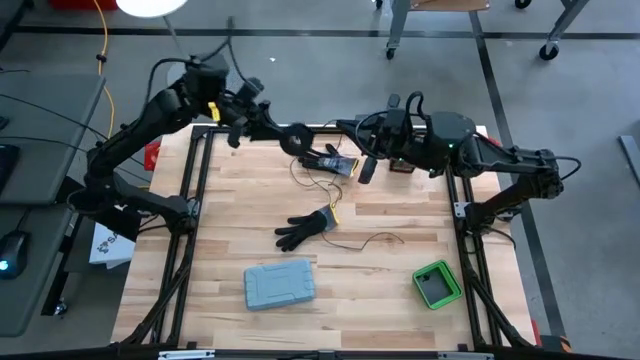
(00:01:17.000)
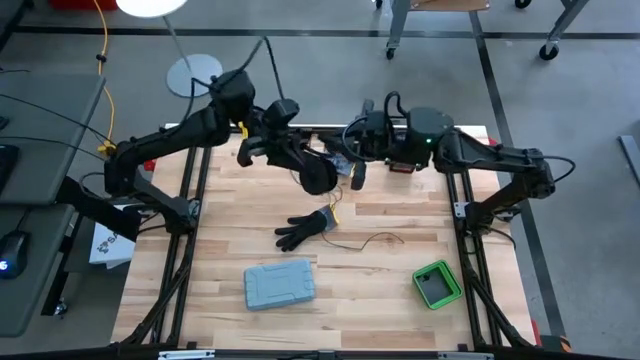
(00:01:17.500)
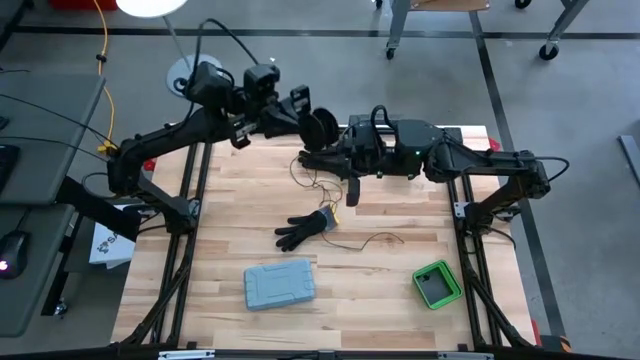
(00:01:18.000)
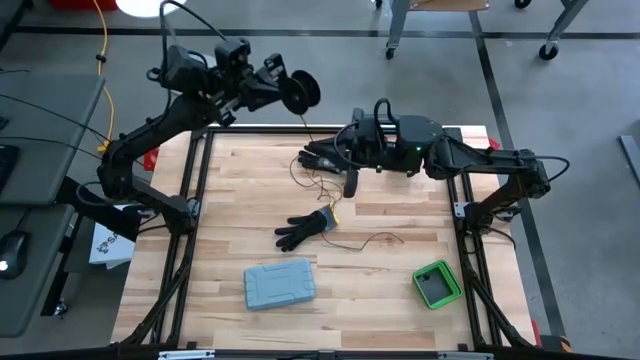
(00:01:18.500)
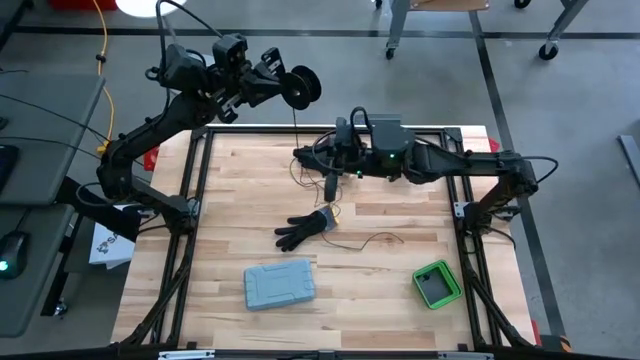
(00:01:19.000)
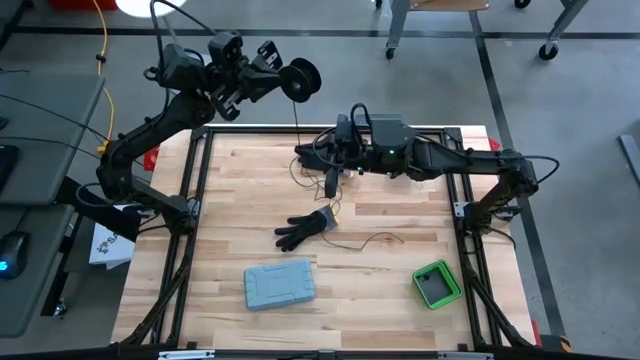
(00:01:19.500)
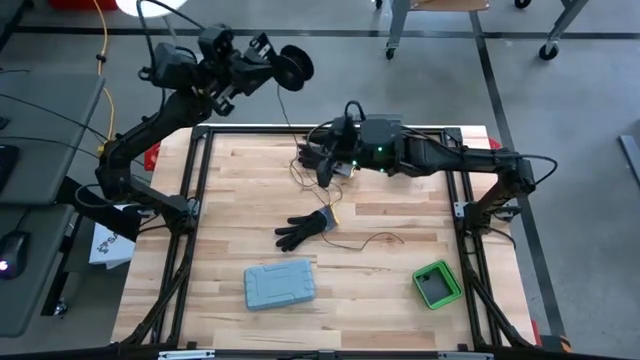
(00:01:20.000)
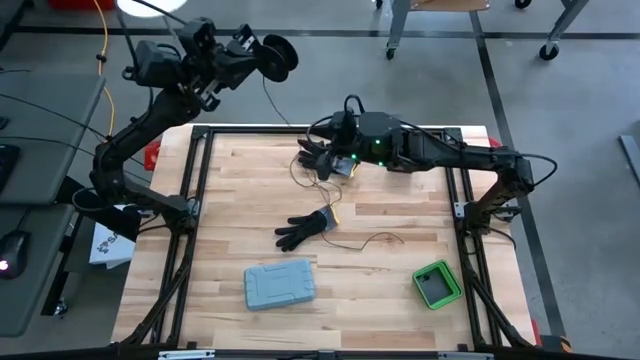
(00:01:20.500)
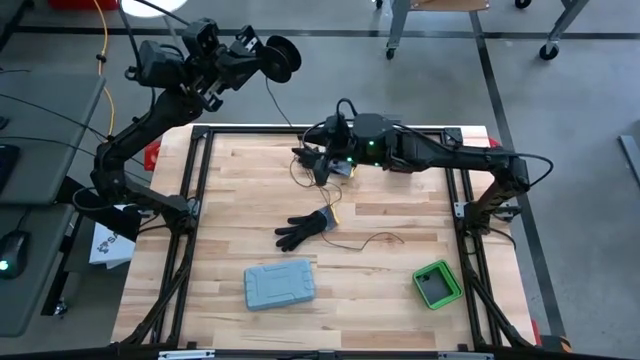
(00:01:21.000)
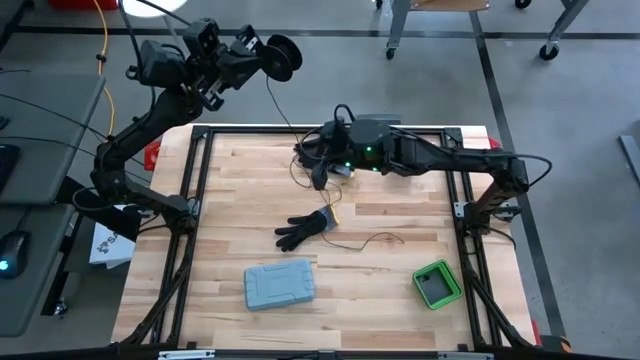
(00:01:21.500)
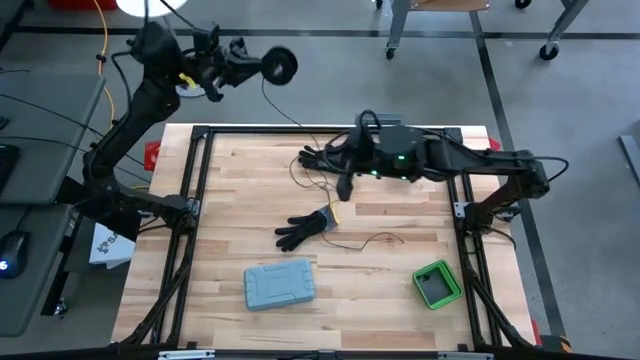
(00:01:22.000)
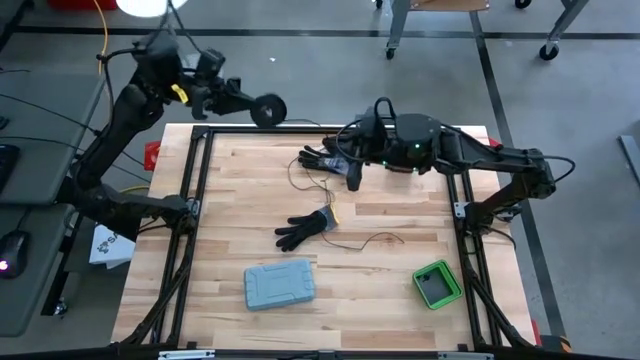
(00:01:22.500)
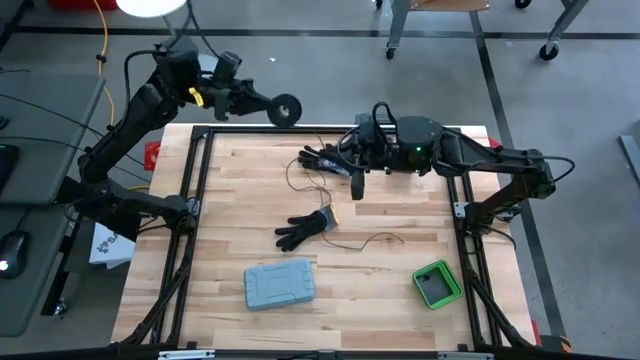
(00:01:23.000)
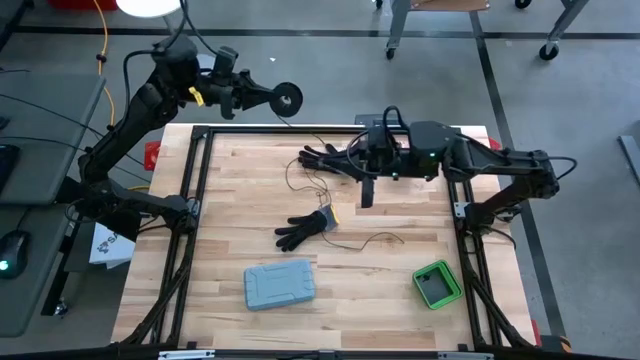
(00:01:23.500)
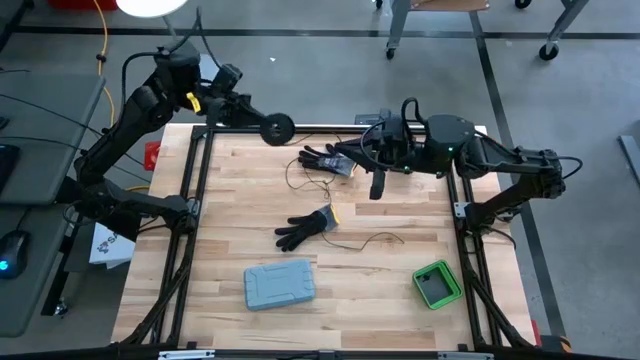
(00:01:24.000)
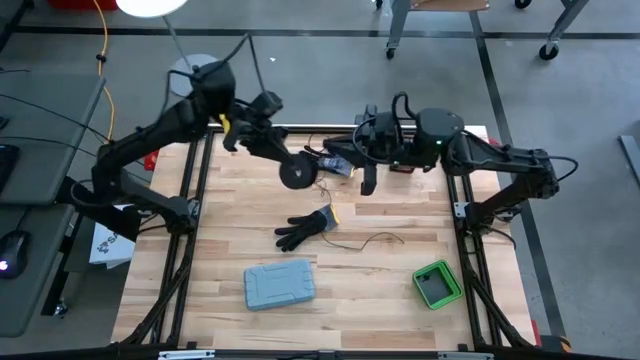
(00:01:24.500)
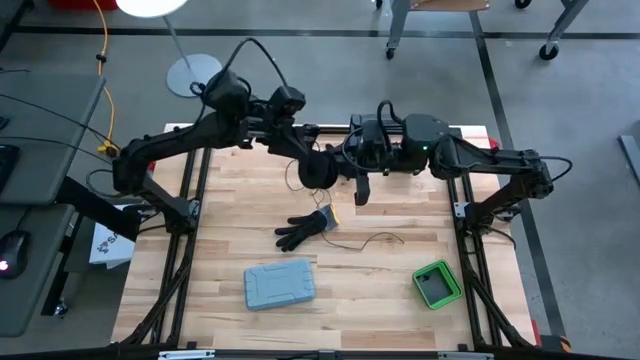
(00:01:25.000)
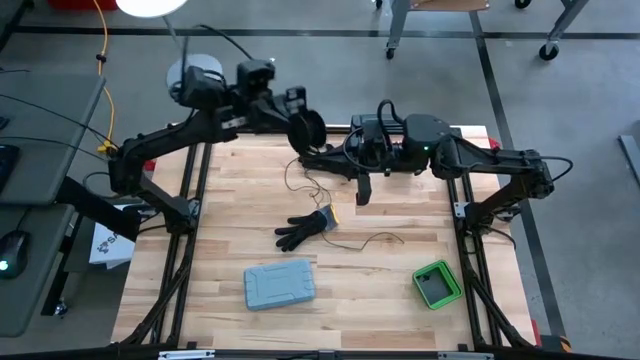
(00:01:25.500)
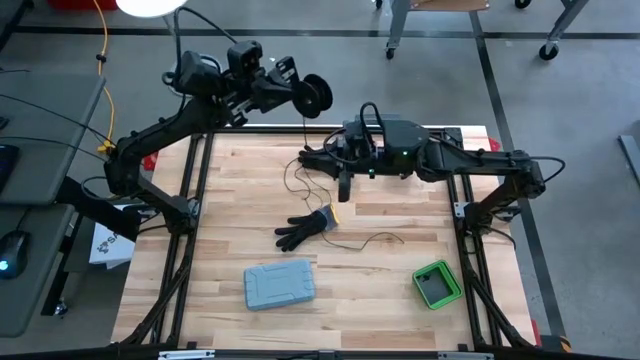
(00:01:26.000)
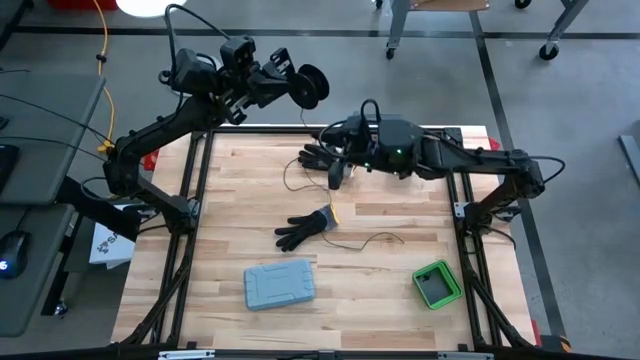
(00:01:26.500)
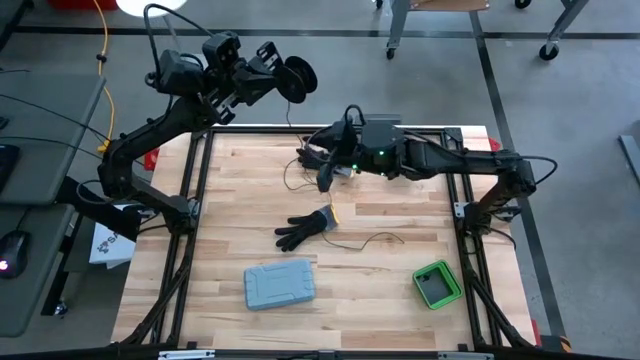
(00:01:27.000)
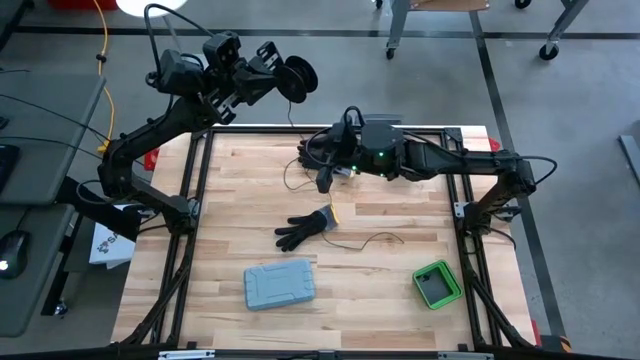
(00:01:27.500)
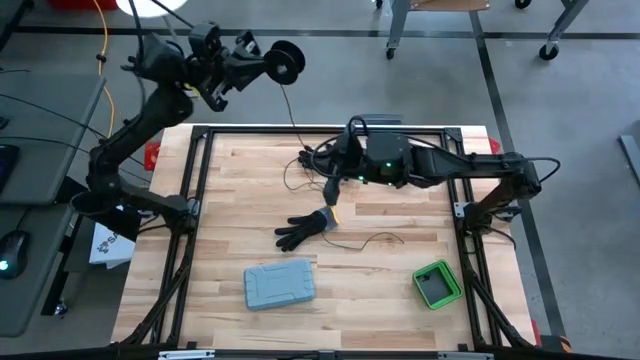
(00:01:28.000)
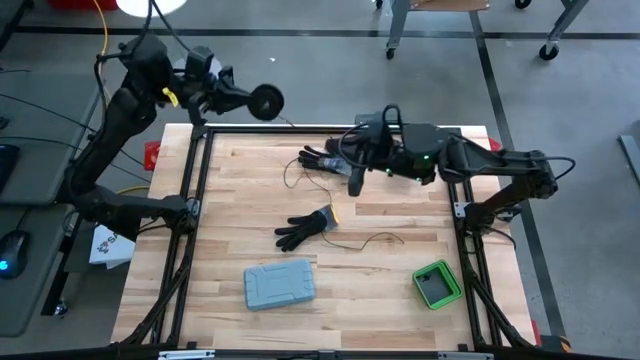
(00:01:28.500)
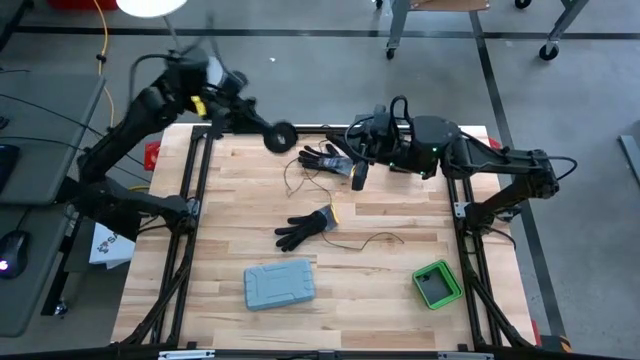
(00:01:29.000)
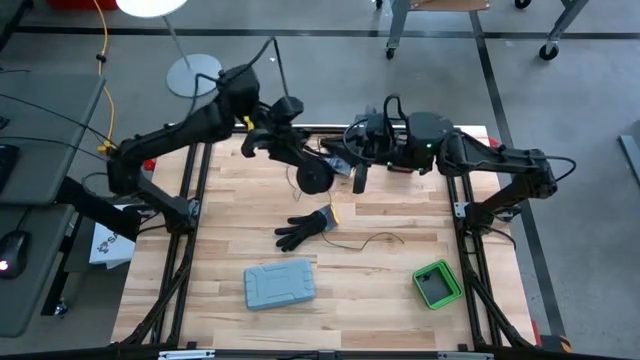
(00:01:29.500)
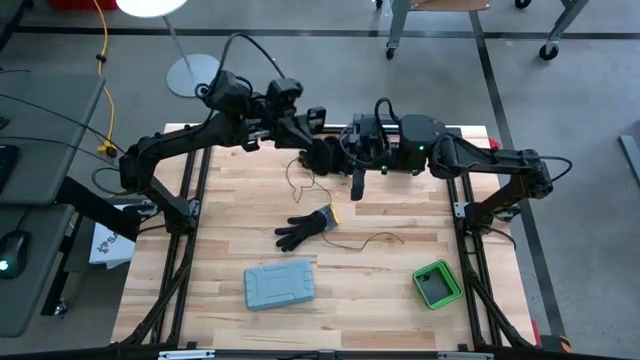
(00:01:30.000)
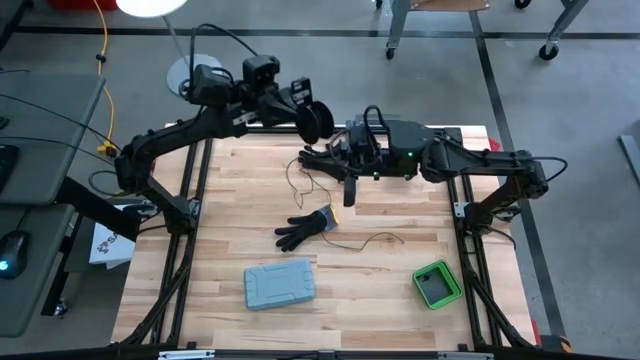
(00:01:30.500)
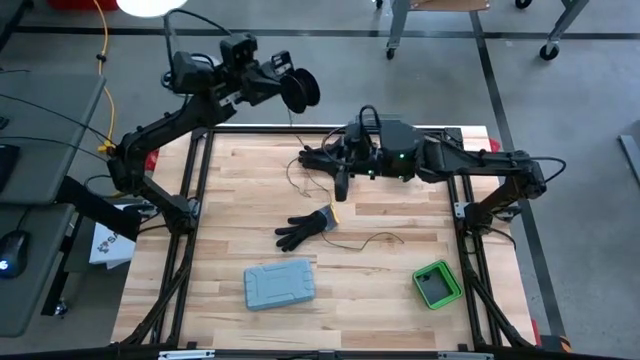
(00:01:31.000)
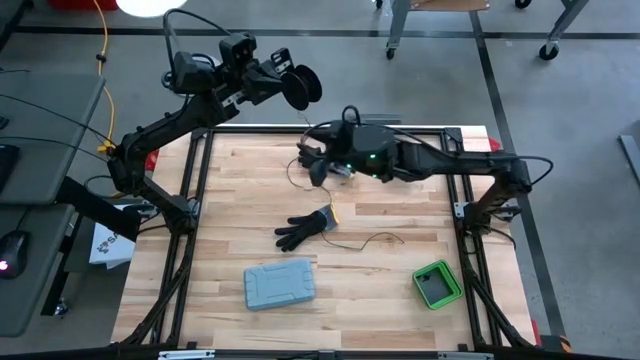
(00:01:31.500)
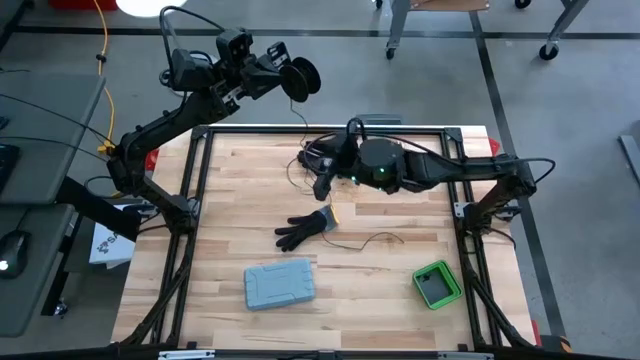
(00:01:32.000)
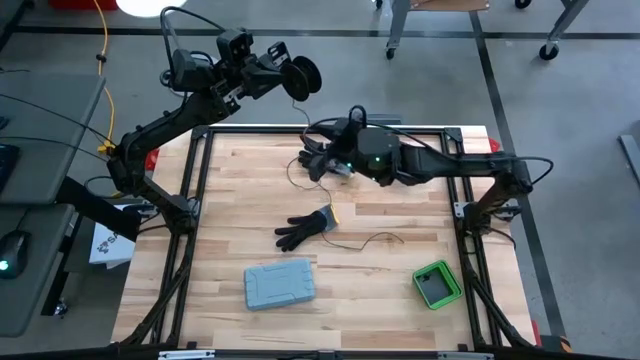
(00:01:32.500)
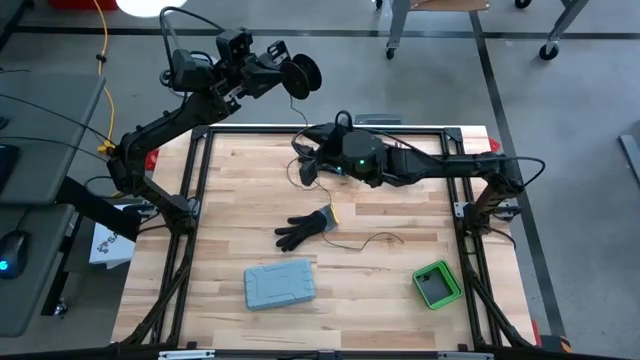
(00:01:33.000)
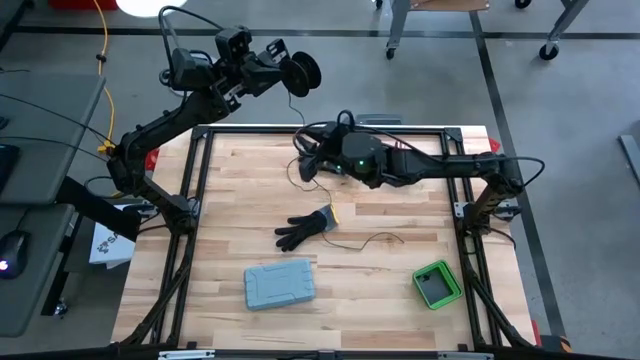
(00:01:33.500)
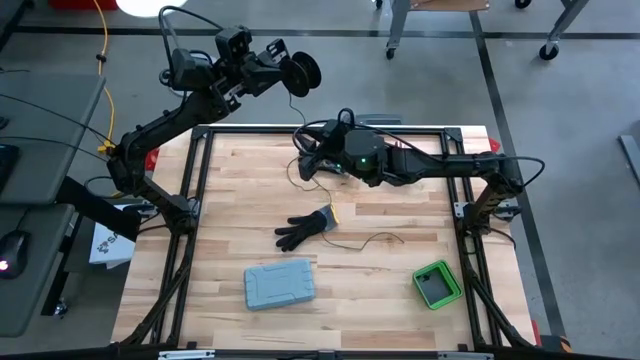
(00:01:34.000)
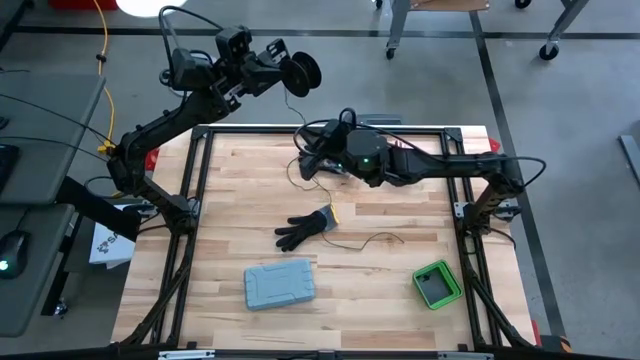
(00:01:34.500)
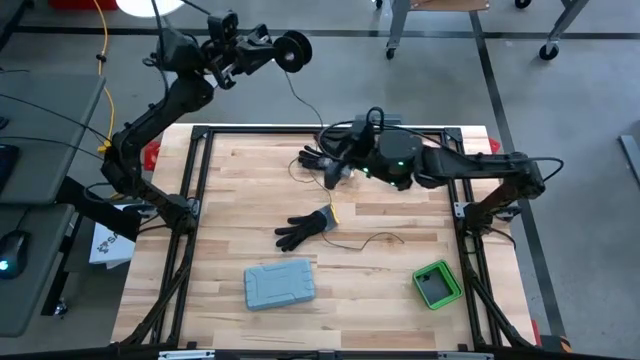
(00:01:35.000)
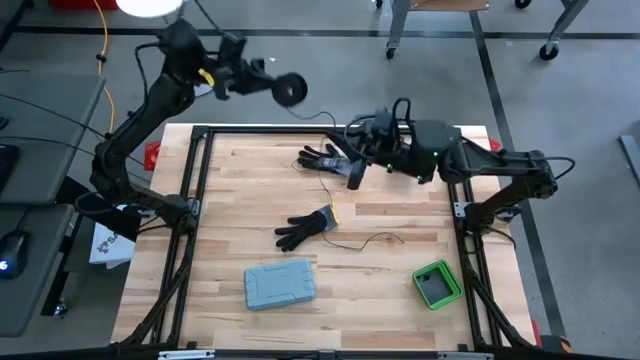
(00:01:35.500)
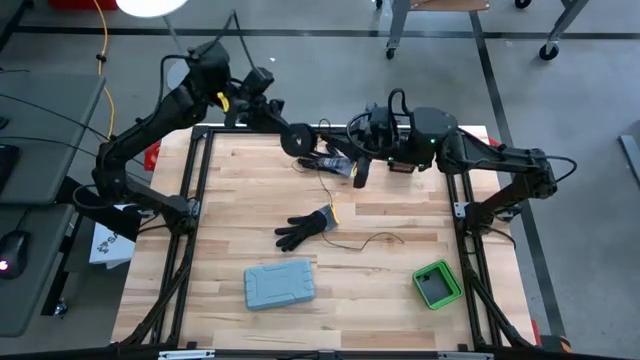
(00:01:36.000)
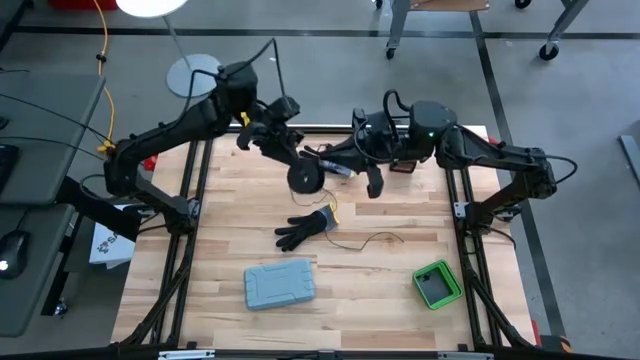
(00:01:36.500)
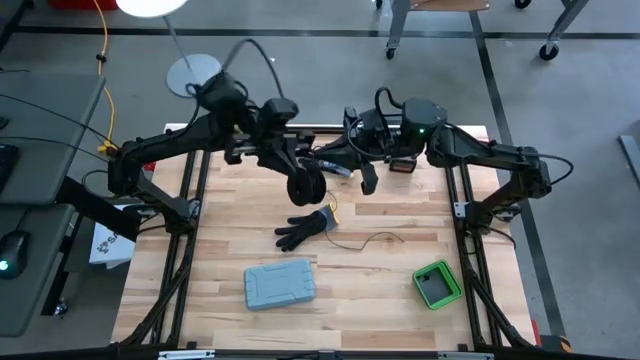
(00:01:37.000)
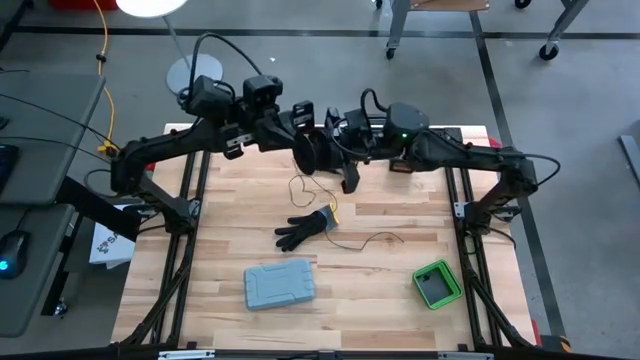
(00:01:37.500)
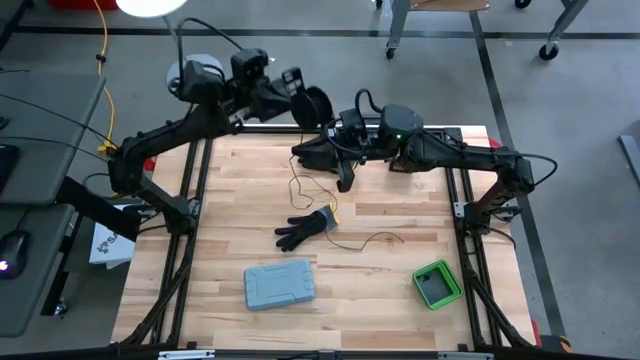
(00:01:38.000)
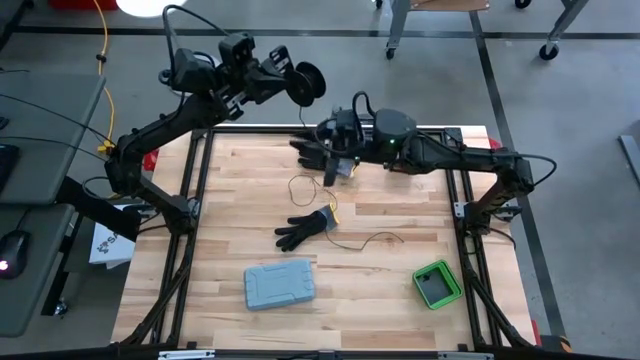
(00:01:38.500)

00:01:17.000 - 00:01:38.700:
Task: Coil cords
Coil the black wire cable onto the black spool
